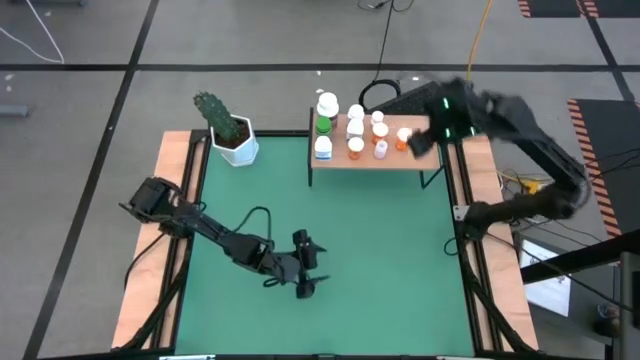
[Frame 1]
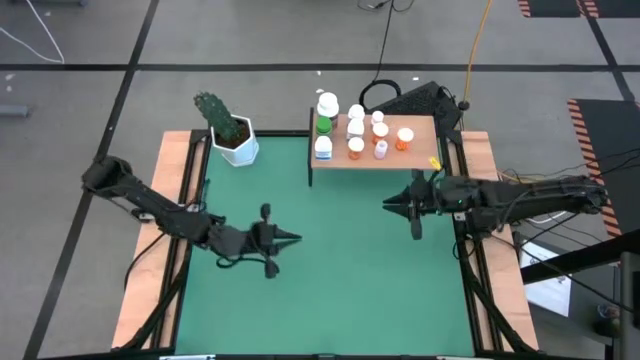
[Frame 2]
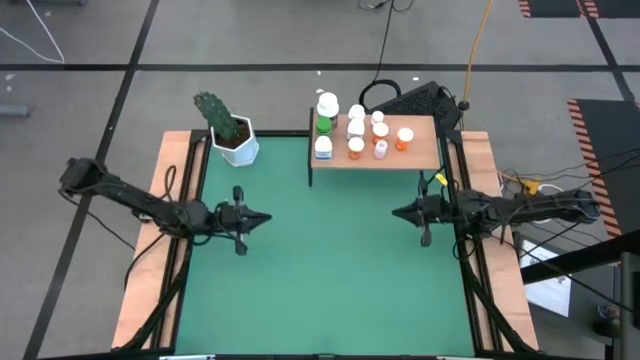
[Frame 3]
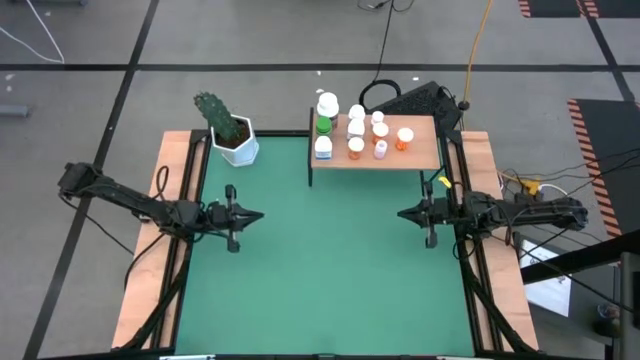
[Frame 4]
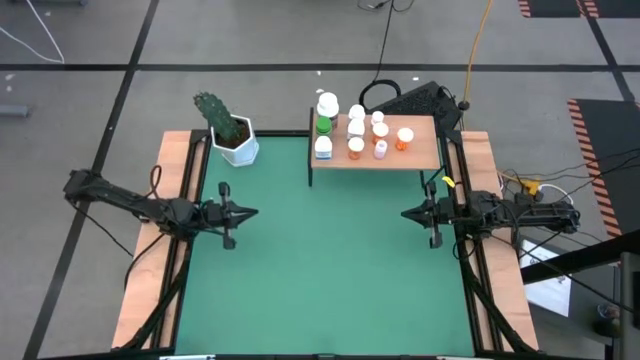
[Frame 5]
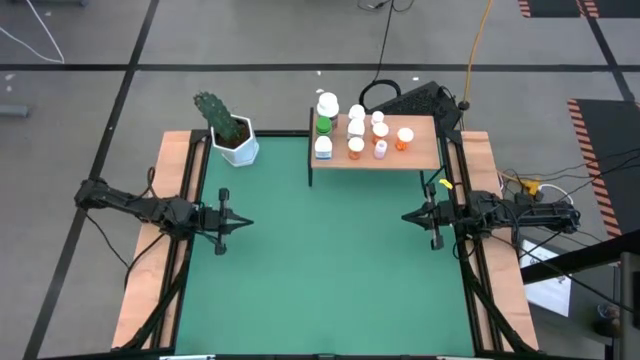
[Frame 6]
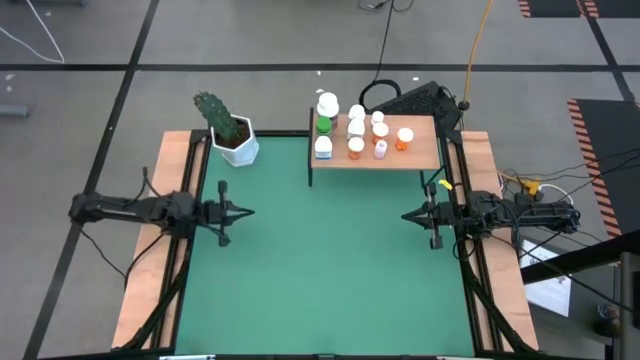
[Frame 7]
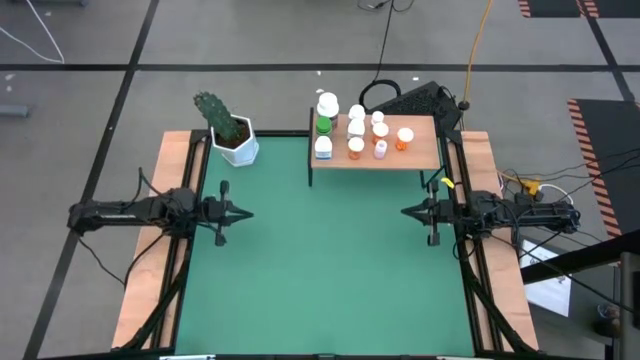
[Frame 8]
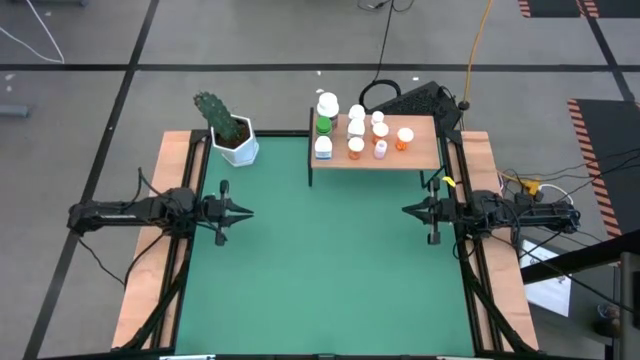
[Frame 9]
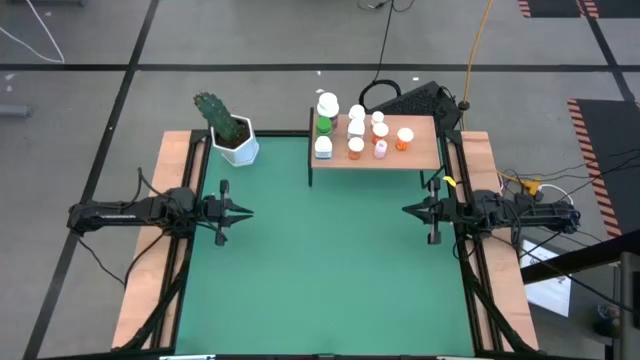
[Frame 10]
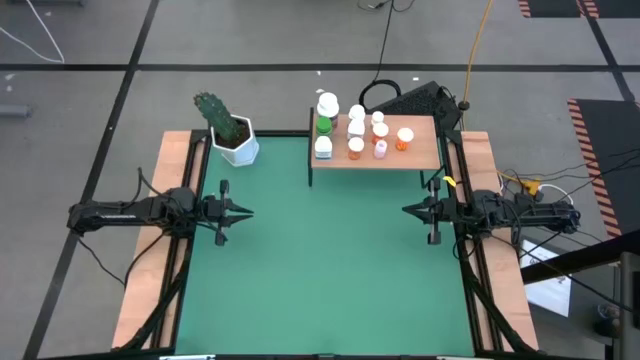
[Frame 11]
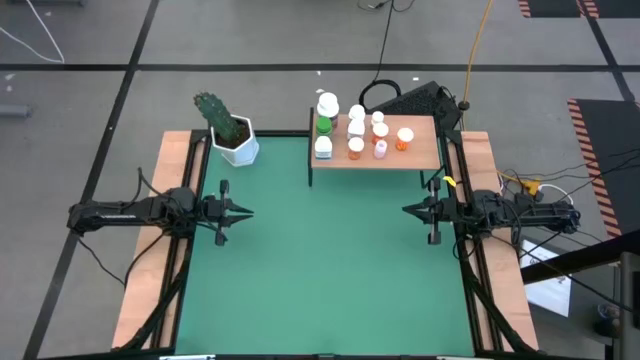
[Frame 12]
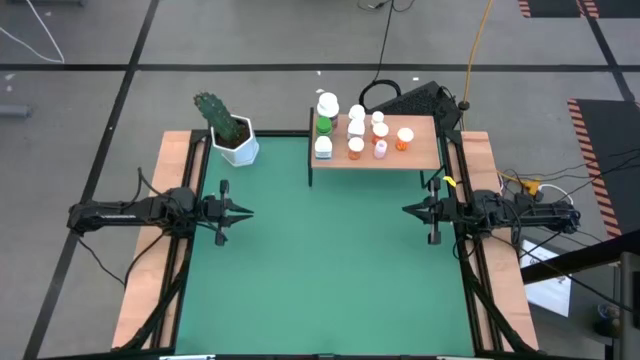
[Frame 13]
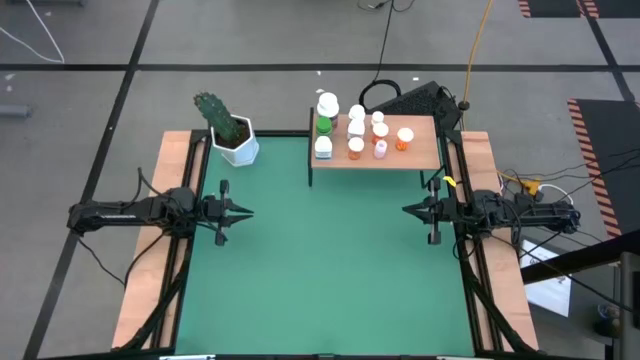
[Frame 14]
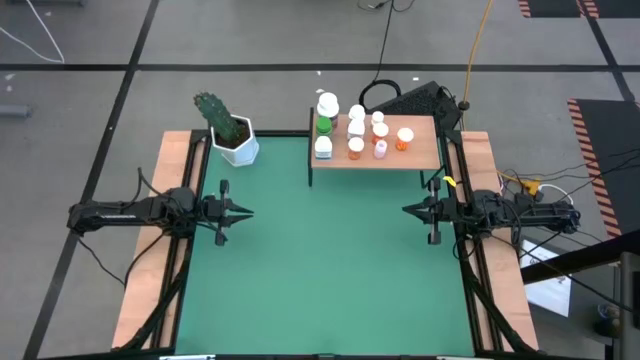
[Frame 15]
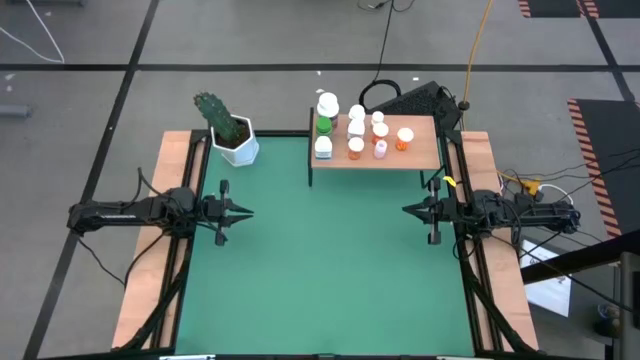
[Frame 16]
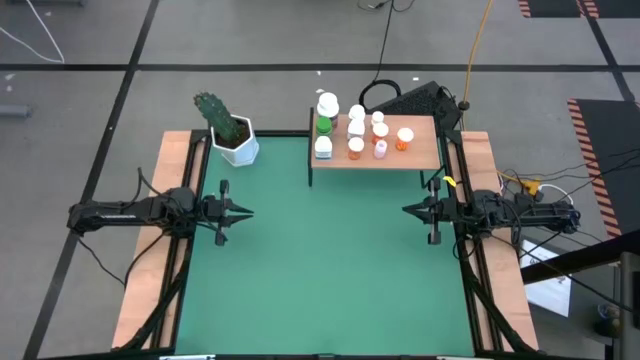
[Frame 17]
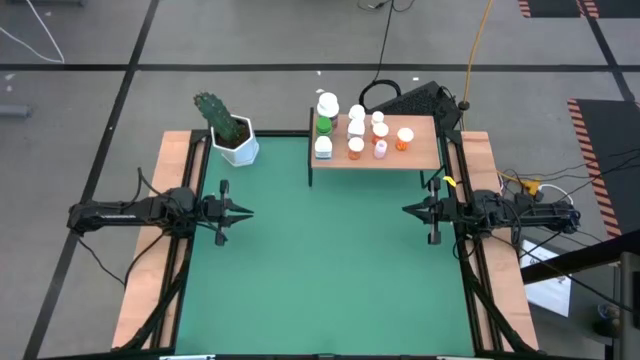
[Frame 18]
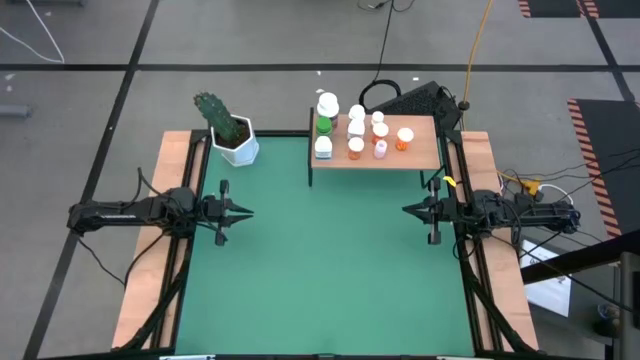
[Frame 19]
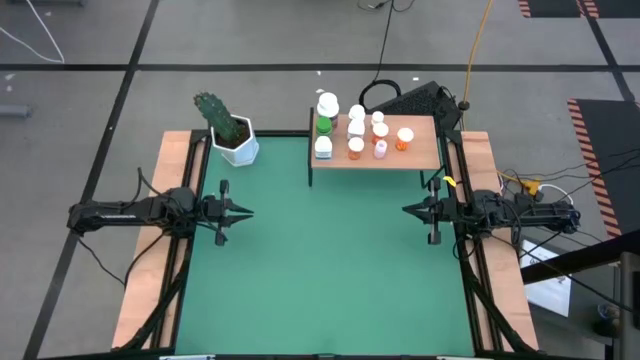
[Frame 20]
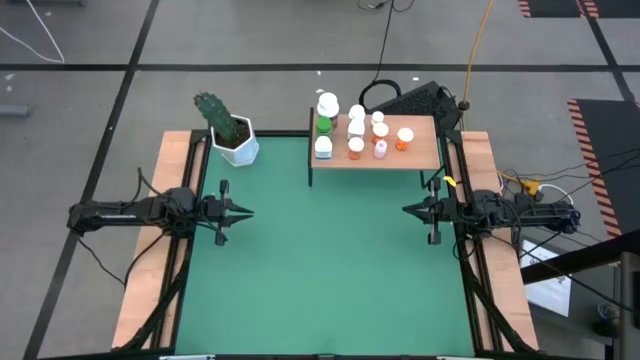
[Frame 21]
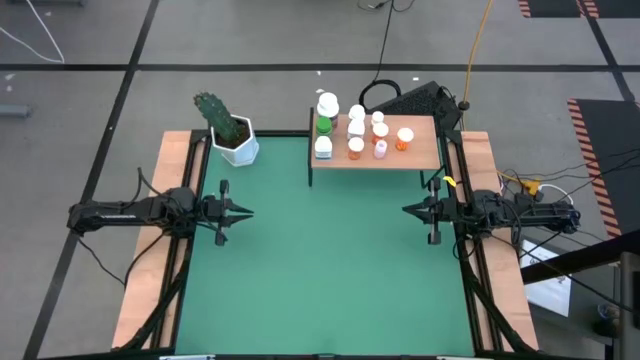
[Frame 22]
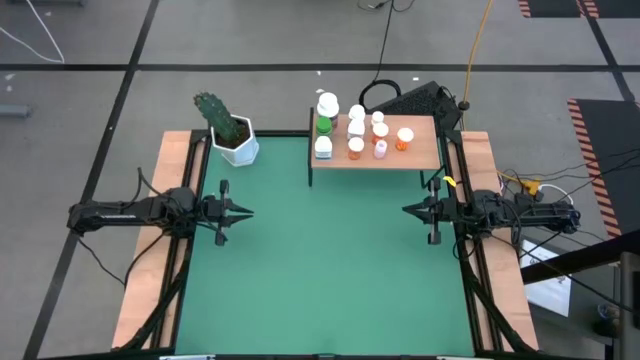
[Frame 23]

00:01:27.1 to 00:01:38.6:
Task: Pick and place medicine bottles onto shelf by color
Return to Home Position

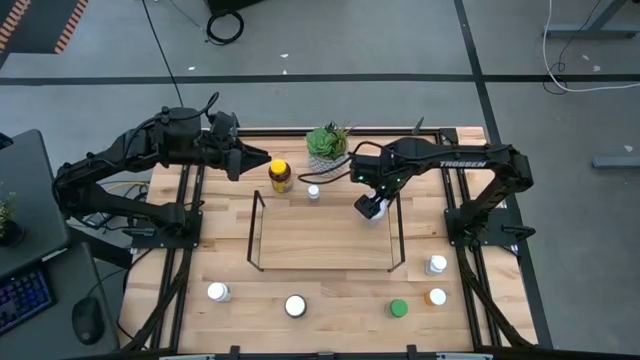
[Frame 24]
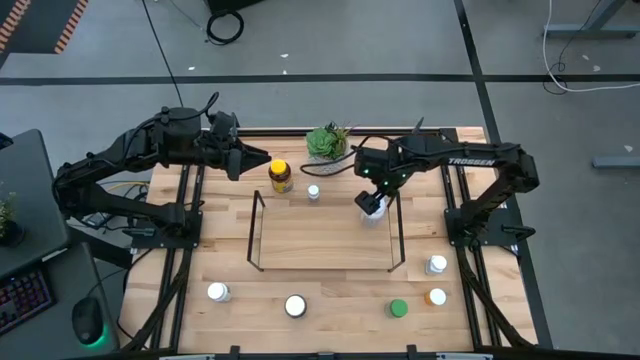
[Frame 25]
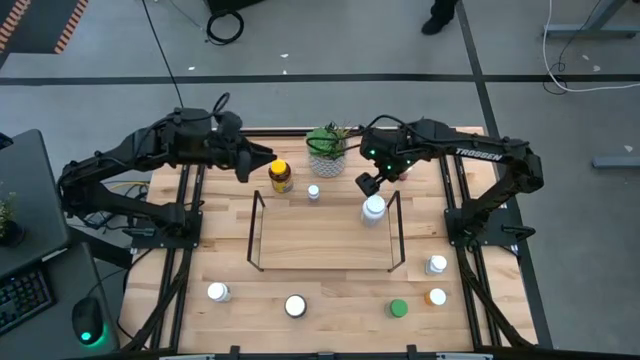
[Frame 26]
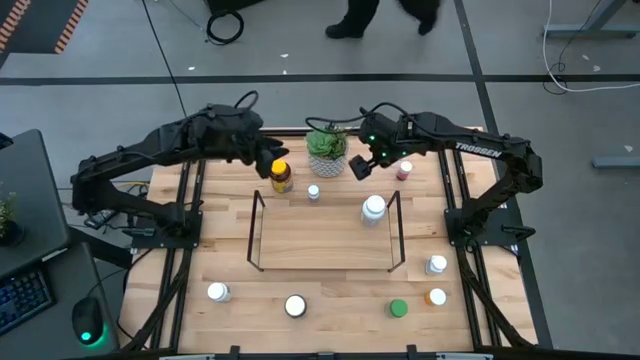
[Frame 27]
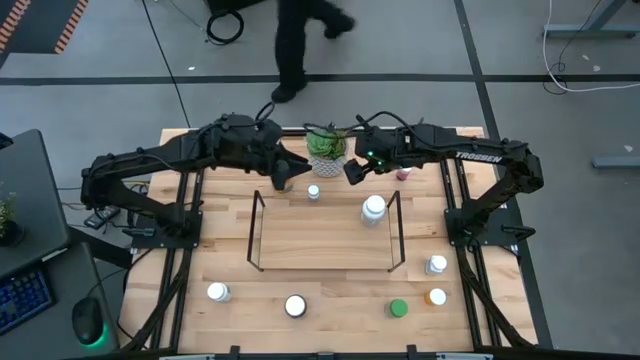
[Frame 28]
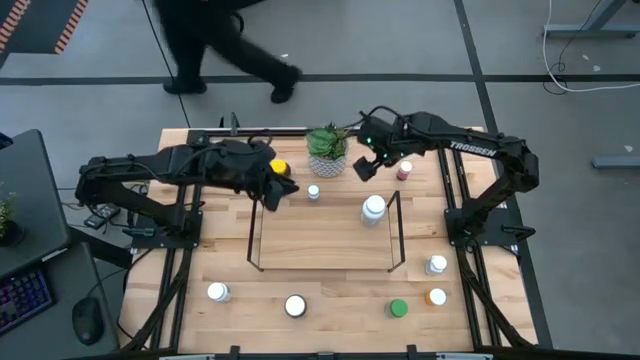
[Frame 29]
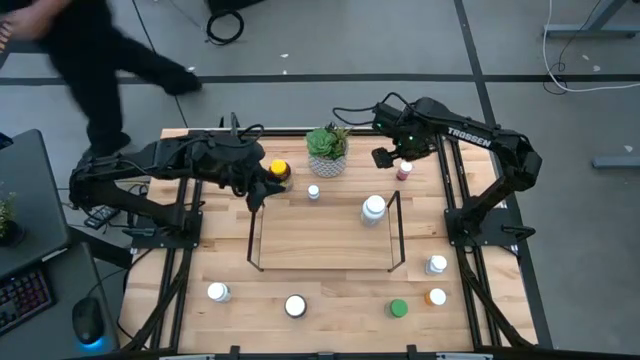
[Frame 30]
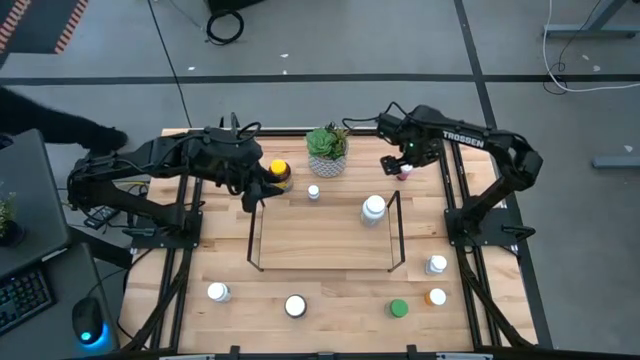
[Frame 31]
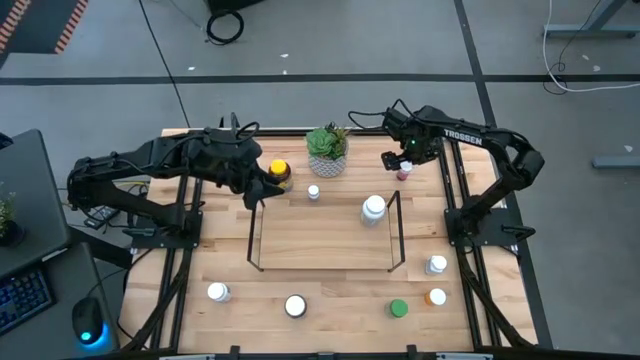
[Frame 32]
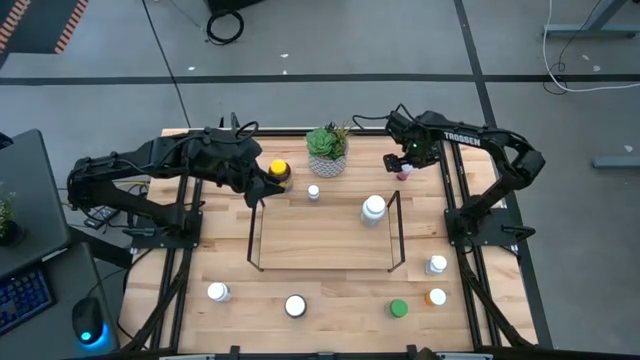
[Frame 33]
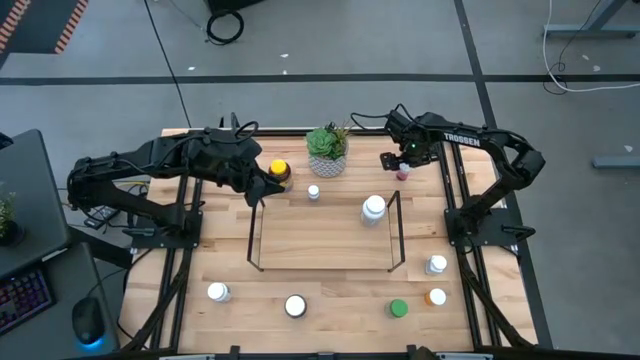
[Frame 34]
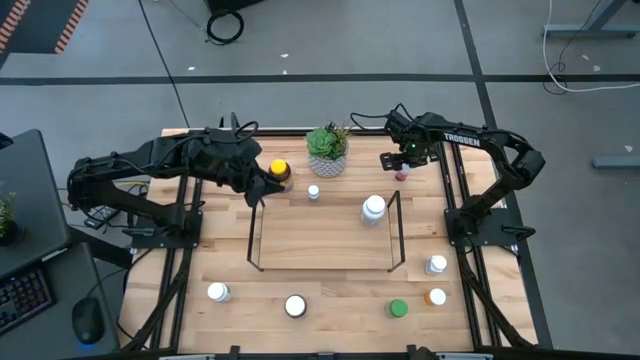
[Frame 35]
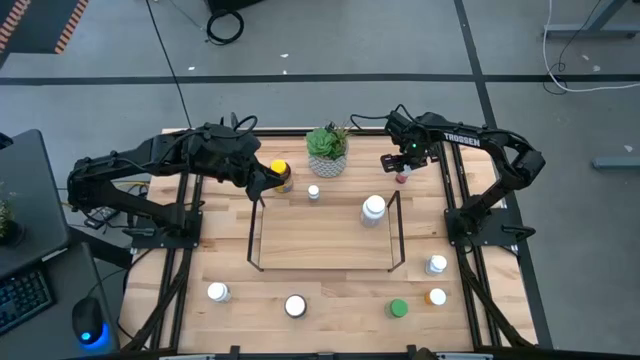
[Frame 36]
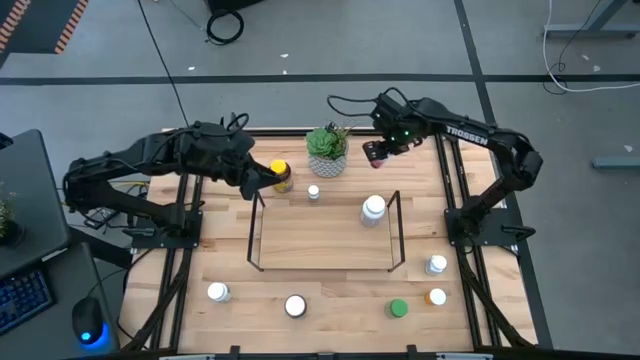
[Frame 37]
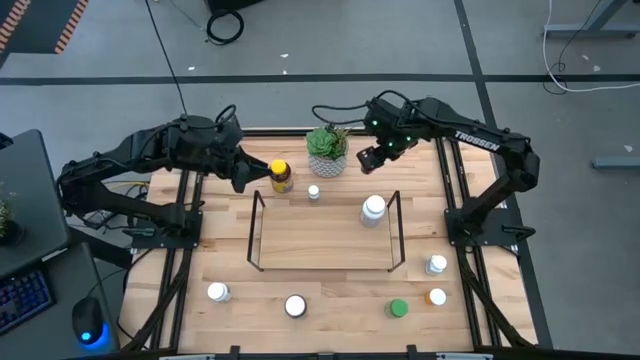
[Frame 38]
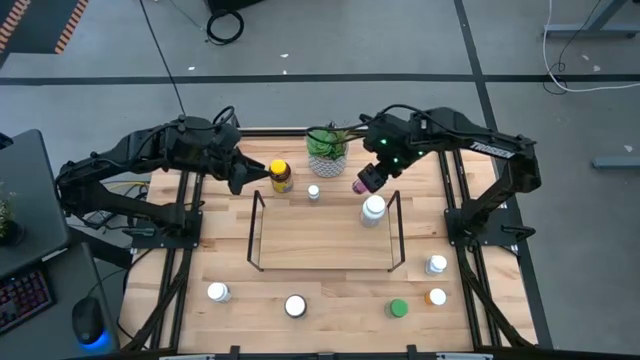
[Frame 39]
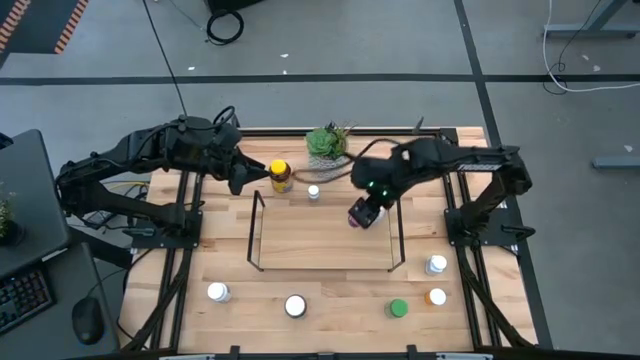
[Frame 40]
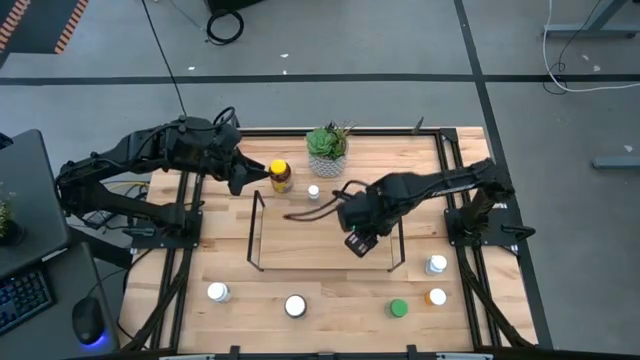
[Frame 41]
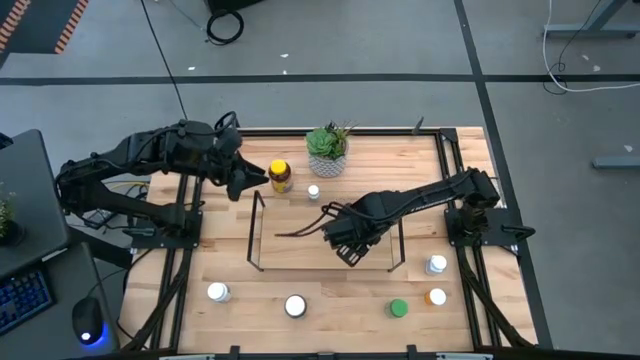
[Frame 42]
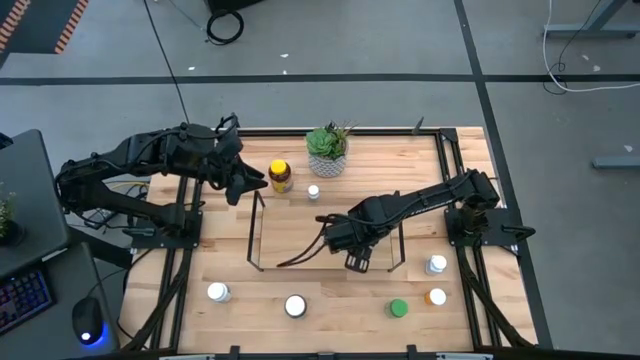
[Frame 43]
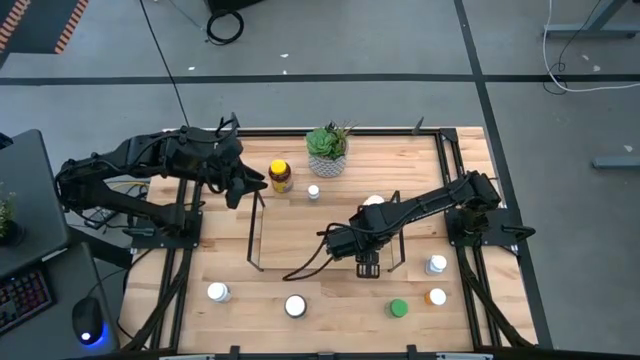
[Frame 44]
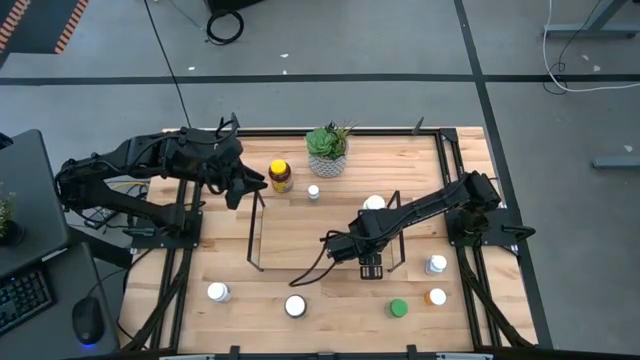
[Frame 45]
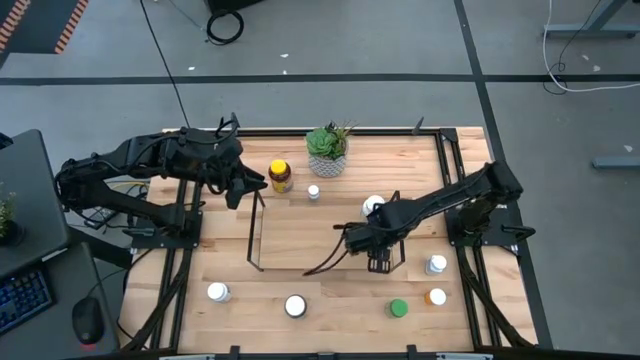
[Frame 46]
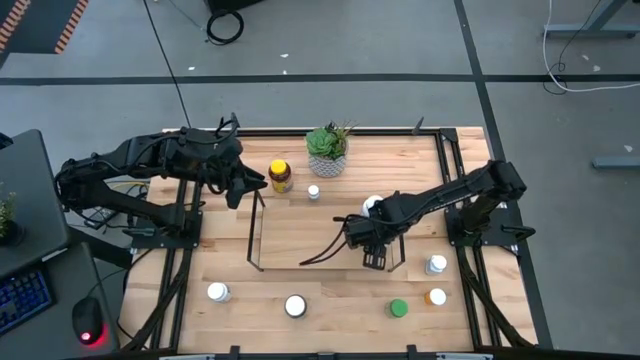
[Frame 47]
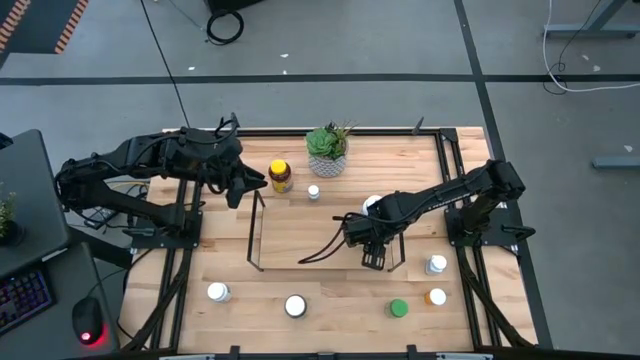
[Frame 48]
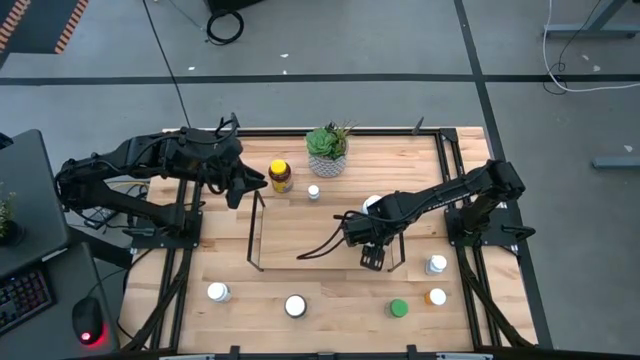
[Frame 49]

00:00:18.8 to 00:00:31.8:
Task: Pick and place medicine bottles onto shelf by color
Put the pink medicine bottle on the shelf
